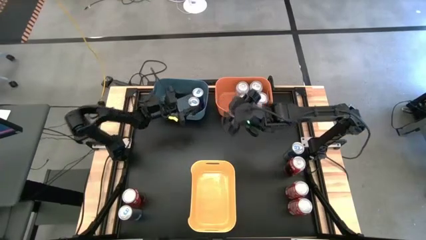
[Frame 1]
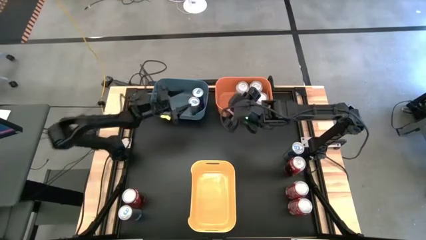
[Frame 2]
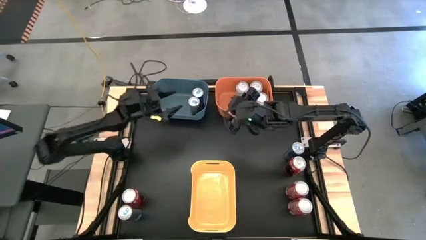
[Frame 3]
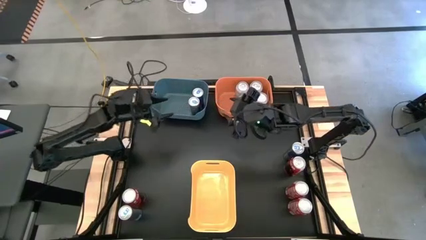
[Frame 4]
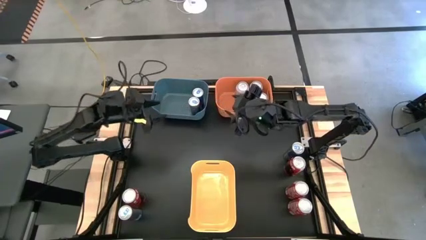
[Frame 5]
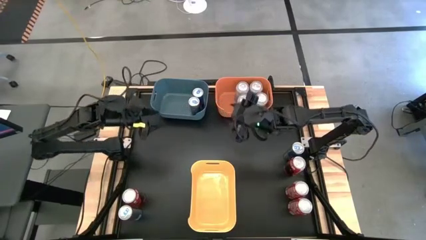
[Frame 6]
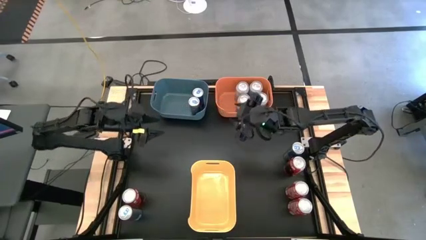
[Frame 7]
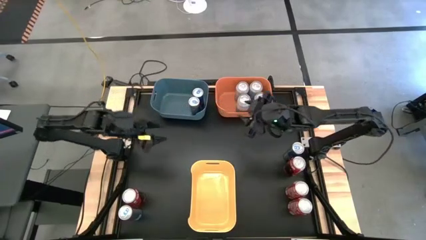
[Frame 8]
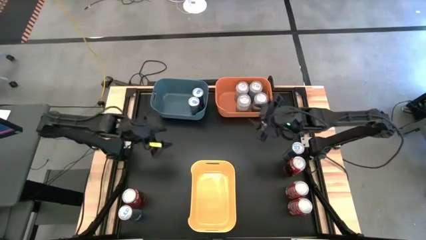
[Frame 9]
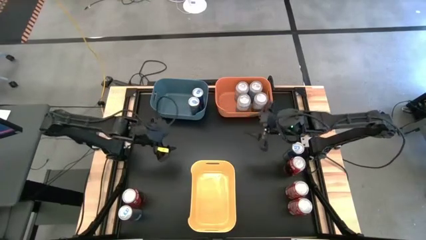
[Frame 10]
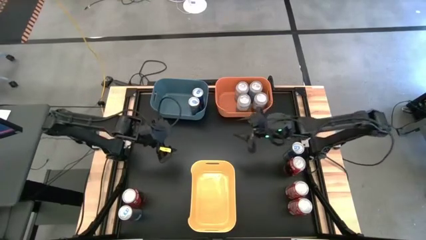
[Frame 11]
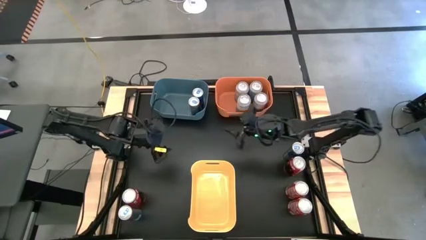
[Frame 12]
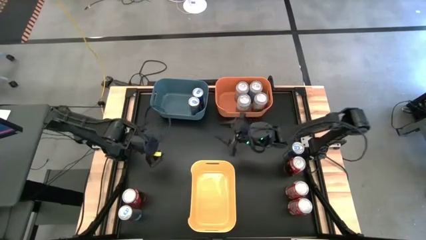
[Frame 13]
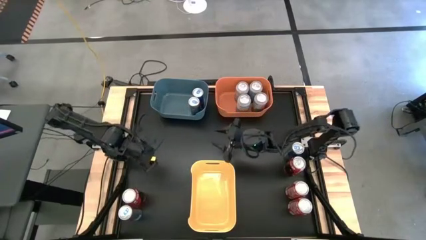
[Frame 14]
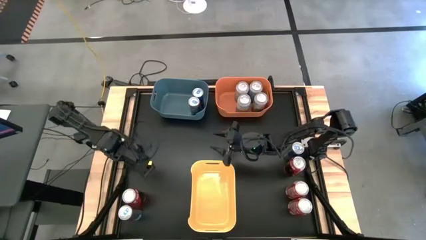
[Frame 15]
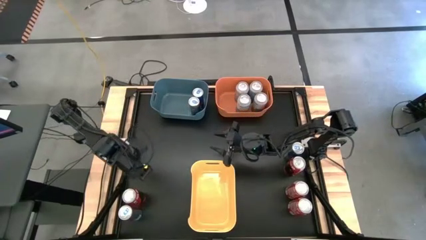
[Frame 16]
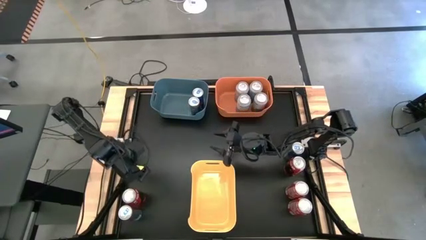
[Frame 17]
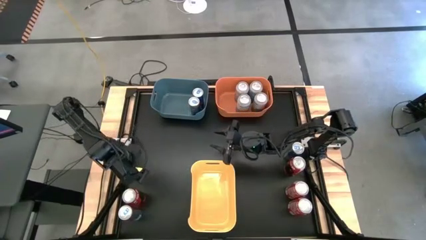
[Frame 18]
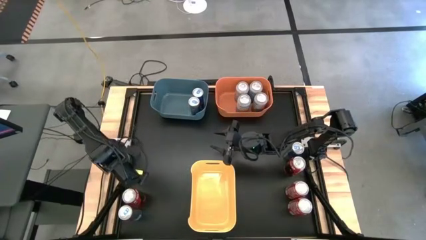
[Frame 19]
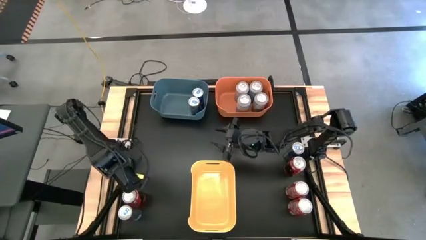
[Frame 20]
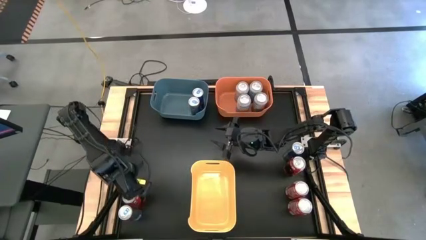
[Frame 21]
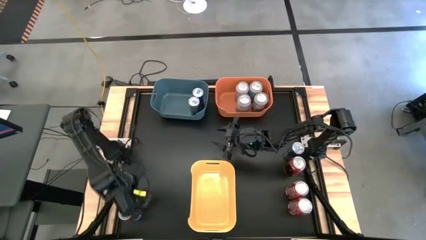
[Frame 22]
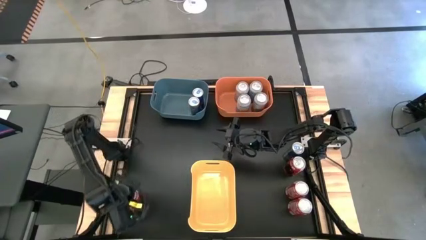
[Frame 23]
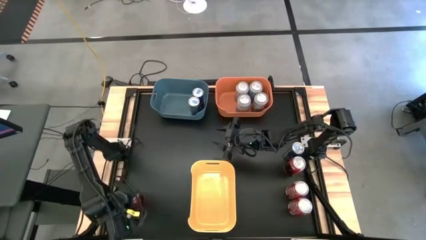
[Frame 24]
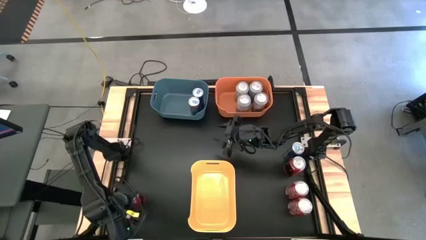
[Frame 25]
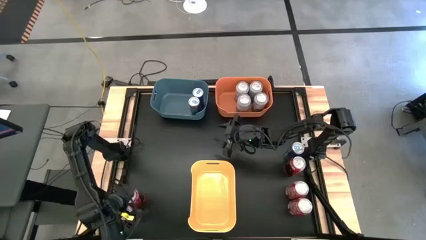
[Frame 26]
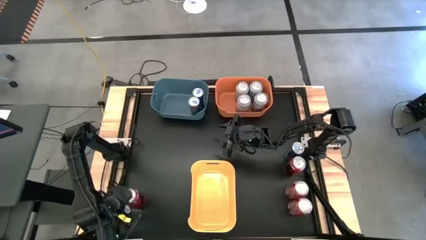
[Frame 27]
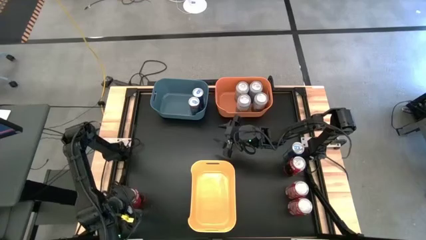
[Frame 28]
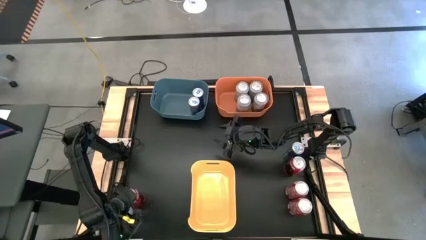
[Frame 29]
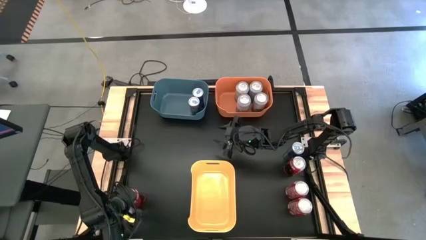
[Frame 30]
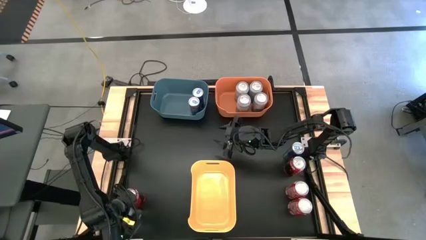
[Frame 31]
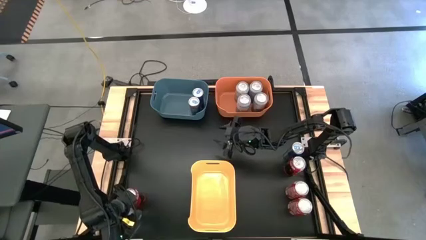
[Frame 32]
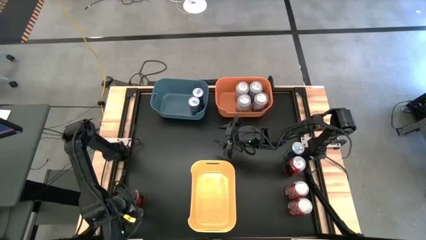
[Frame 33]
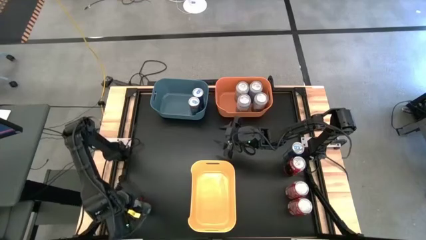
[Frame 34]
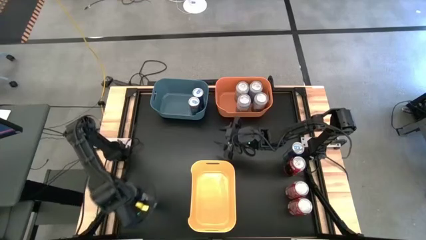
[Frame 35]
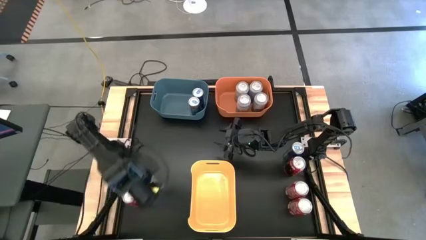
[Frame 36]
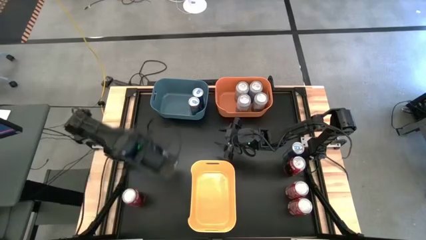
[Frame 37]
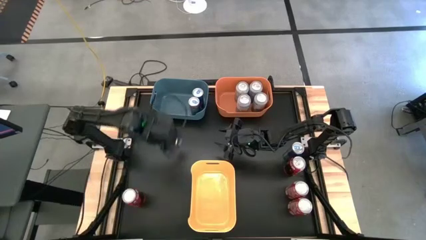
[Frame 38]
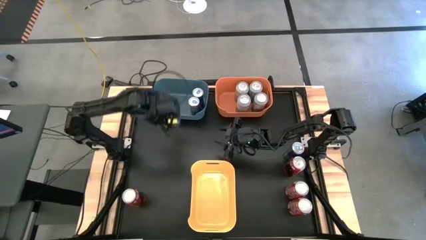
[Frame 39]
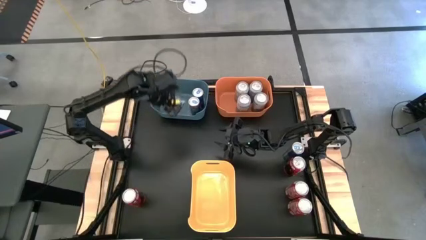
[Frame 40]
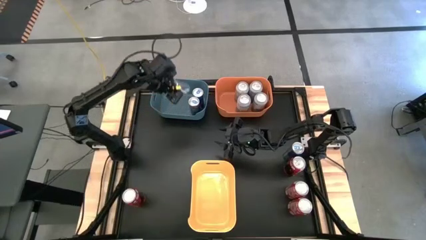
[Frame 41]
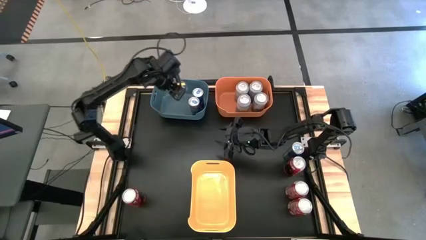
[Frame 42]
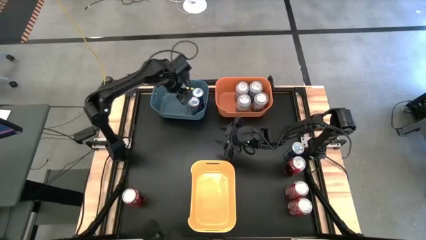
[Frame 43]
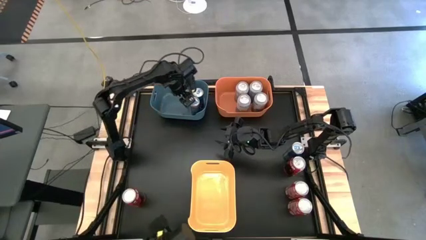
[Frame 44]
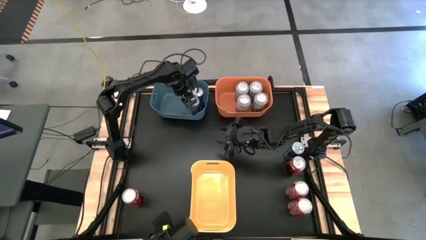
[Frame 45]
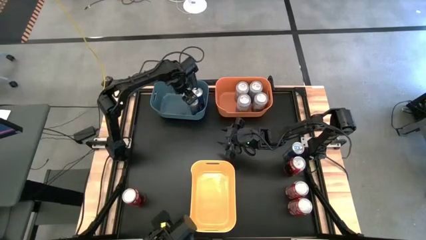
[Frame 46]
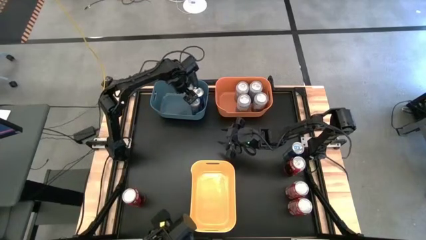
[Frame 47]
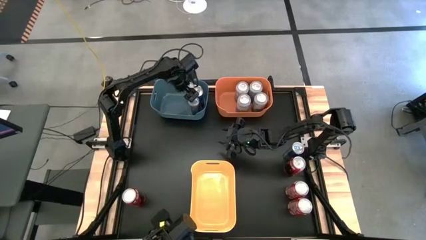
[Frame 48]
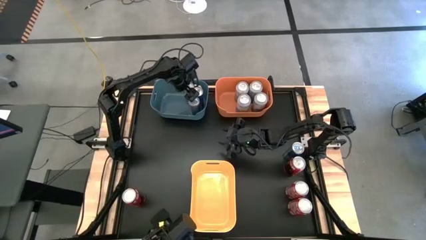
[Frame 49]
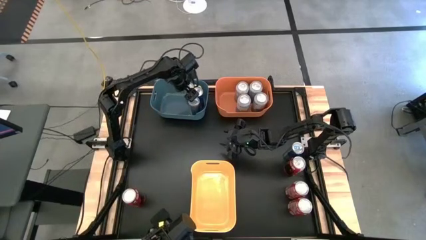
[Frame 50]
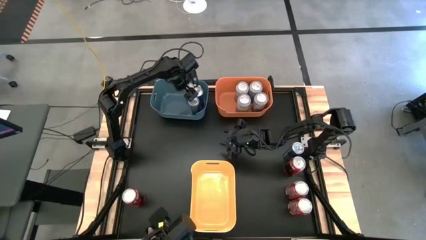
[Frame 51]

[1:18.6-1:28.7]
Task: Sort soda cans
Put the blue soda can into the blue bin

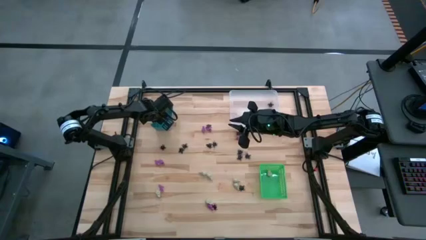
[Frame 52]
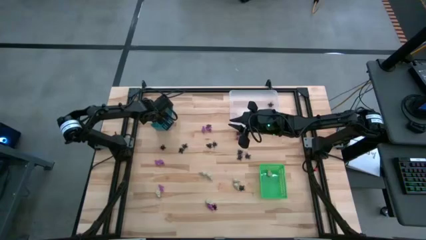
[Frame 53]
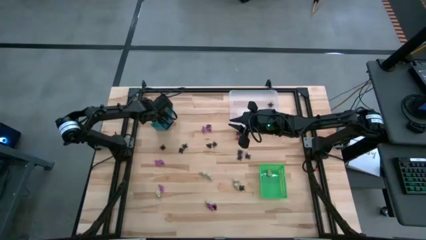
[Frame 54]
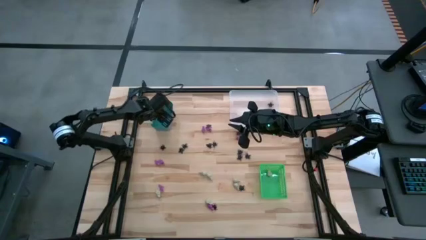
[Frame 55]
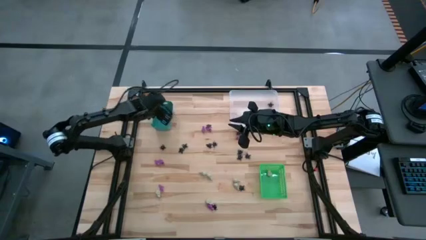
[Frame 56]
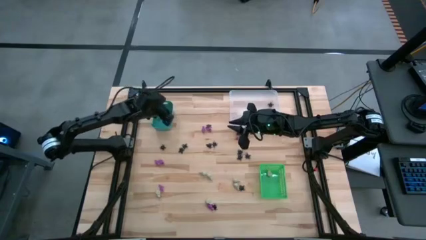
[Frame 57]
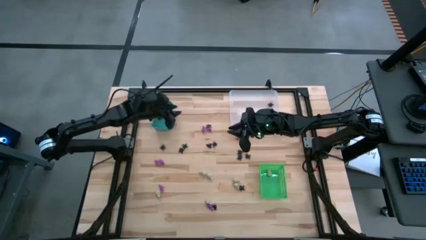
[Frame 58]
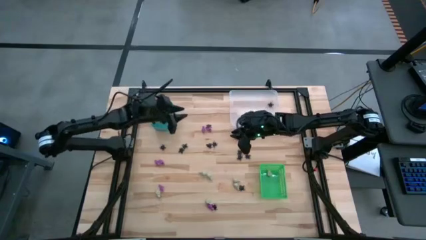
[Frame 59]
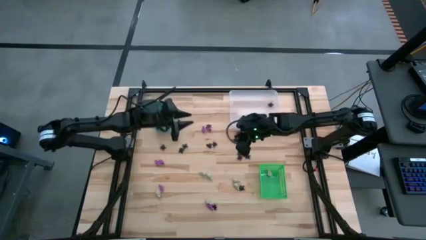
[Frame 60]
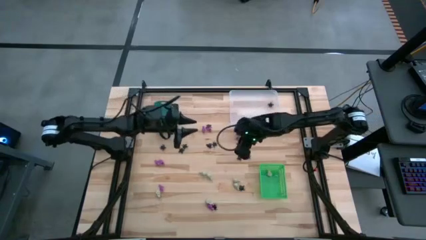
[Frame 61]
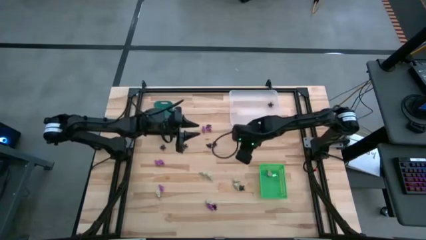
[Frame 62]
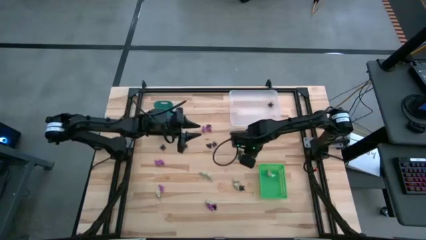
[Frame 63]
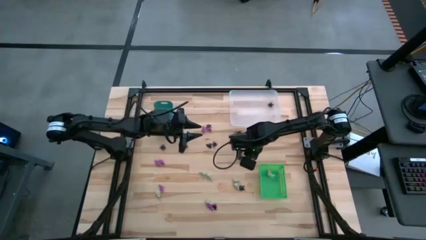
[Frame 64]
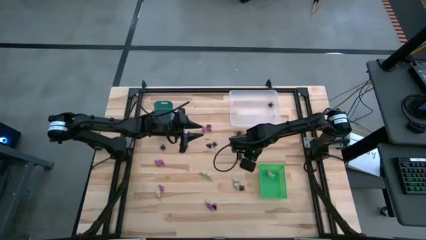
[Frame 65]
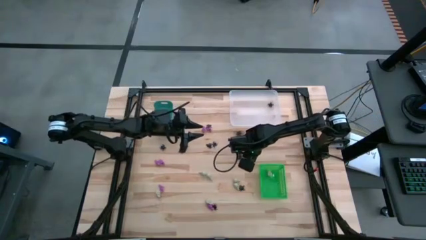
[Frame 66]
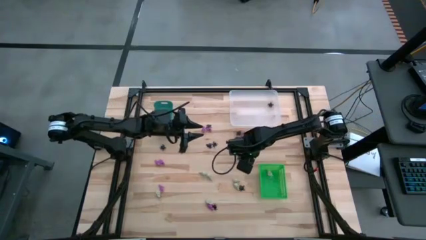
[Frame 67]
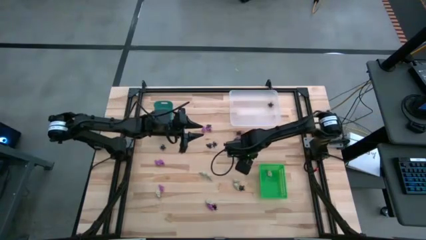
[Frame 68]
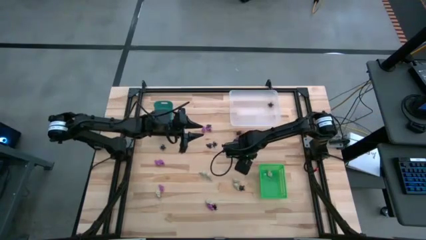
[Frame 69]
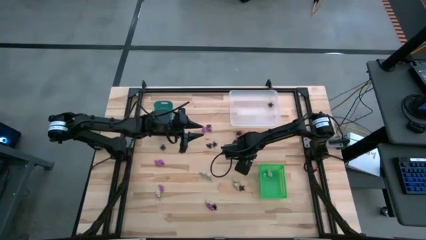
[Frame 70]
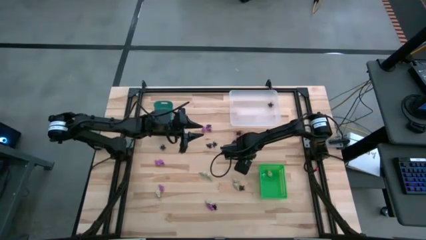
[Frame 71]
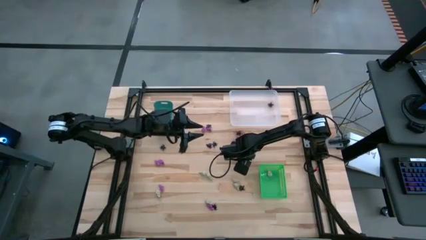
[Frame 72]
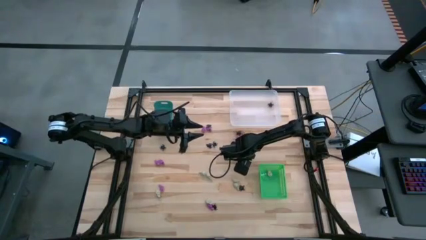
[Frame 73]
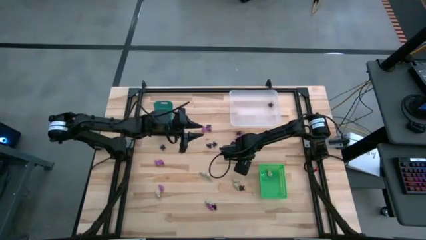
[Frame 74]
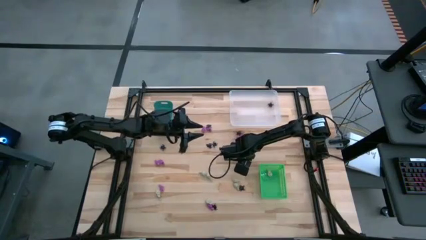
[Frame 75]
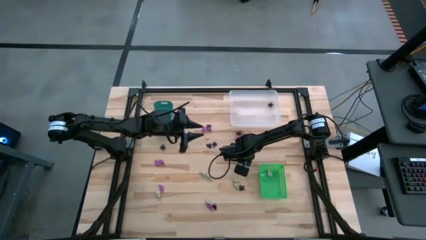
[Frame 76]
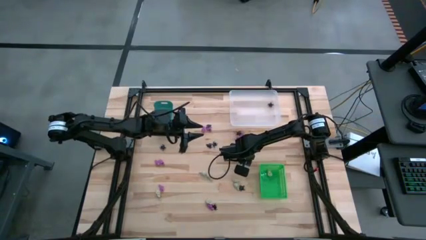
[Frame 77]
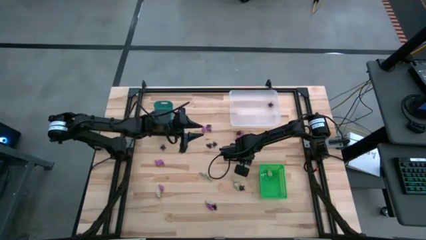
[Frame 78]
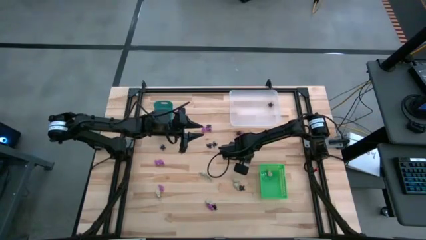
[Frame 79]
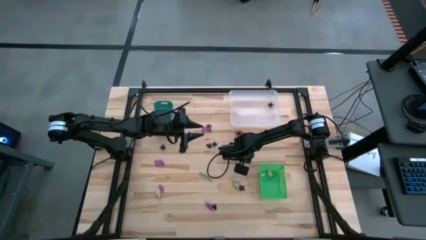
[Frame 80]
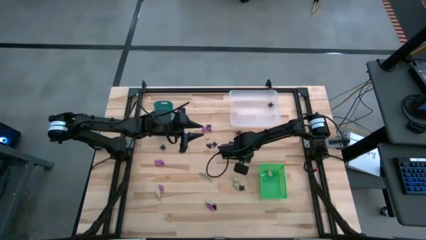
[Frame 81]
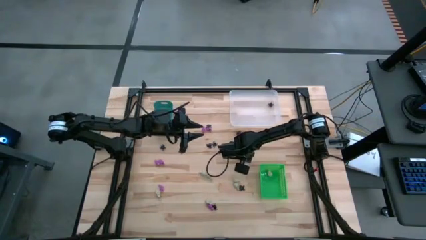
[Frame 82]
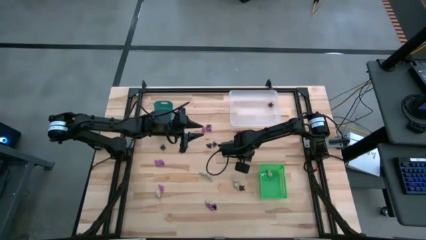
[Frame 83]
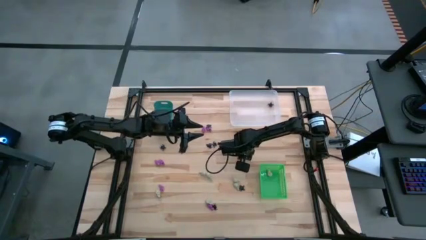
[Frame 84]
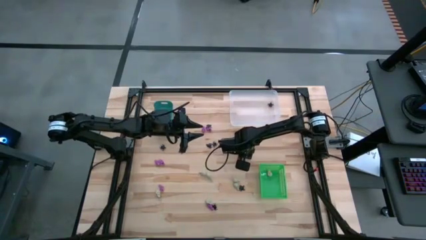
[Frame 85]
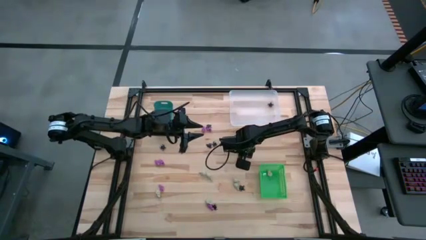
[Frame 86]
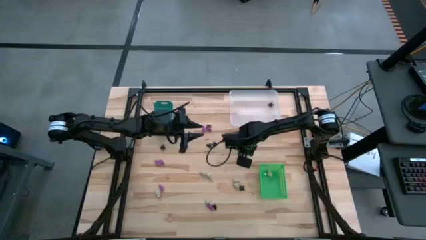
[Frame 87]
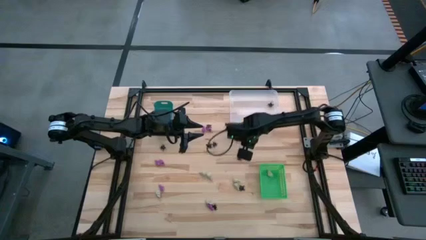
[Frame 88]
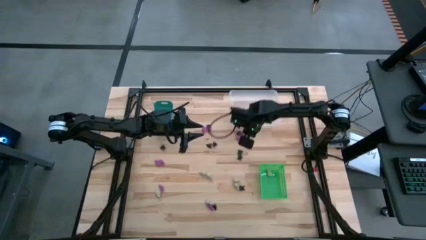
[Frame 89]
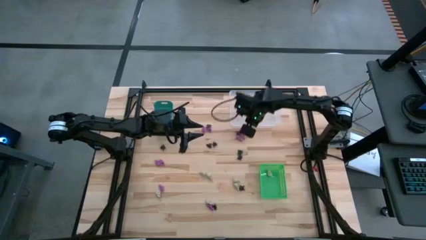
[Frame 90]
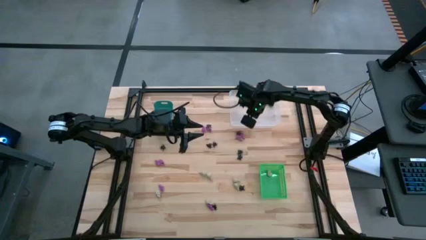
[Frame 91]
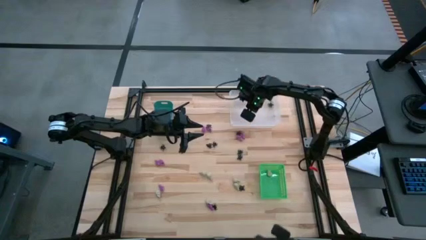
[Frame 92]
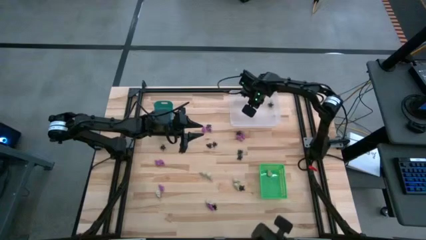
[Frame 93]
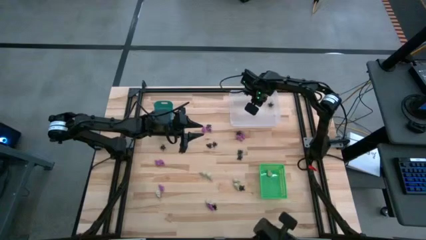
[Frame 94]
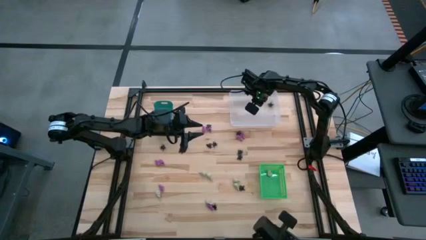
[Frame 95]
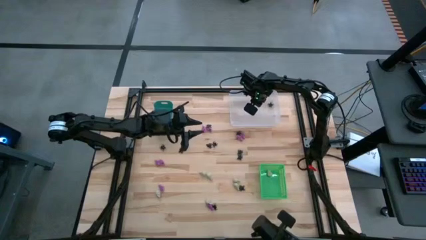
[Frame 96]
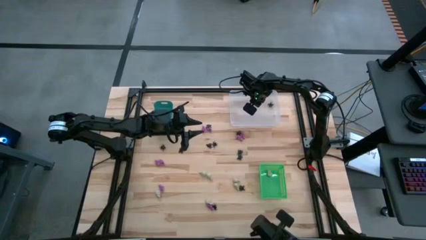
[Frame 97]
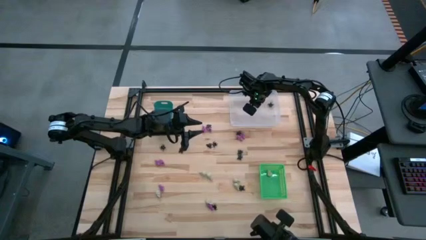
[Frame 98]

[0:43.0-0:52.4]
Task: Sort Halloween decoration
Put the black spider toy into the white bin
